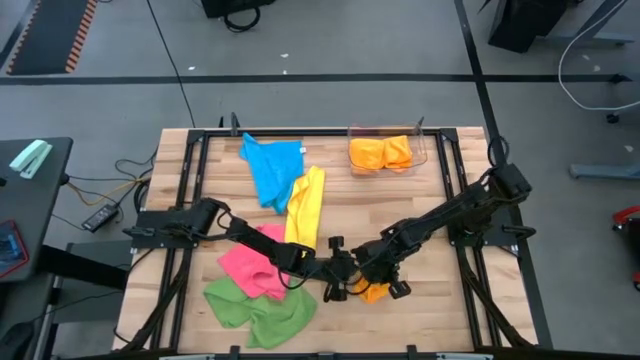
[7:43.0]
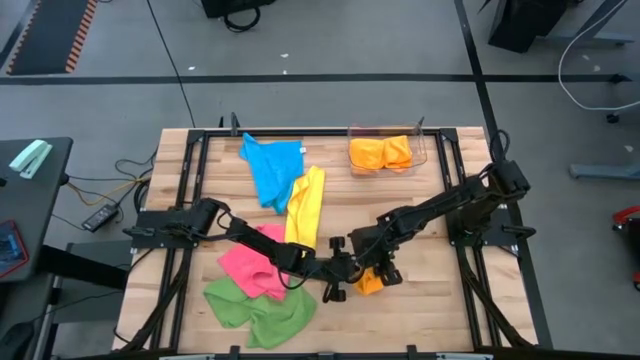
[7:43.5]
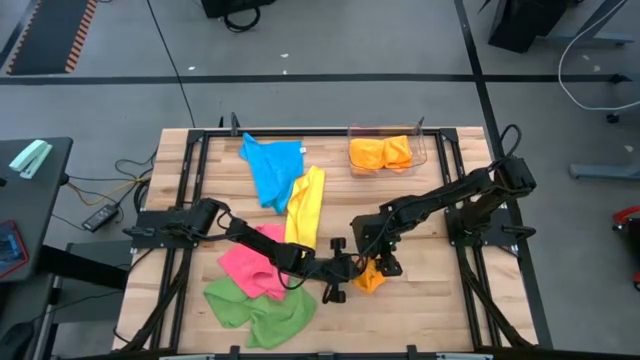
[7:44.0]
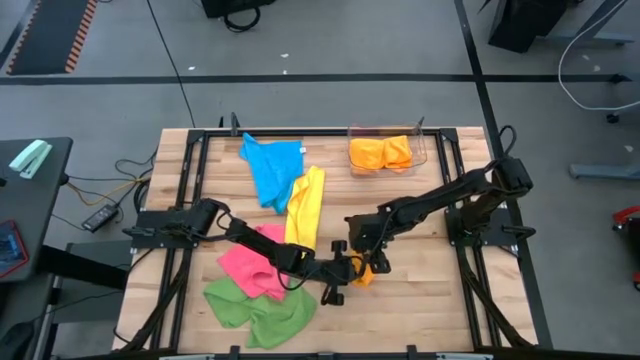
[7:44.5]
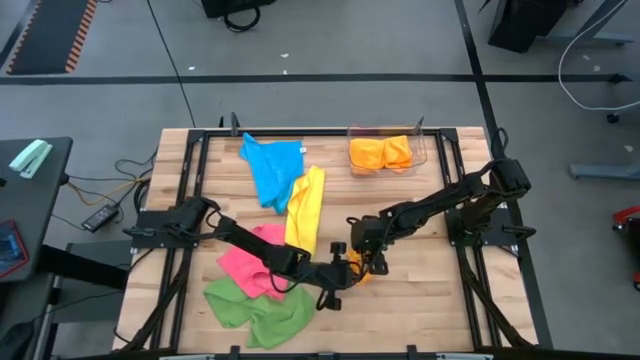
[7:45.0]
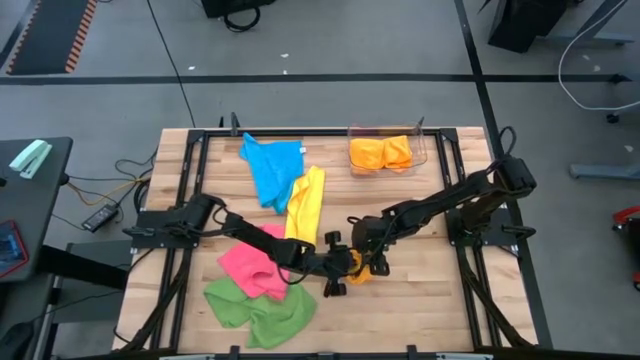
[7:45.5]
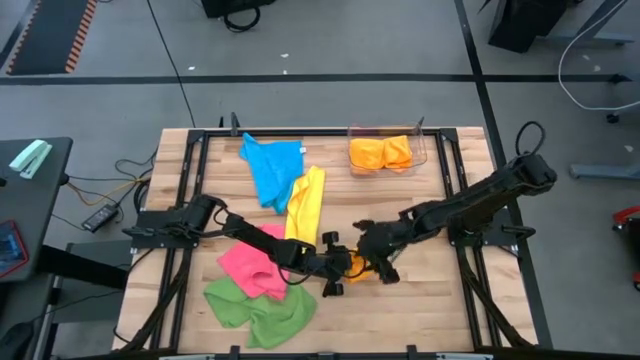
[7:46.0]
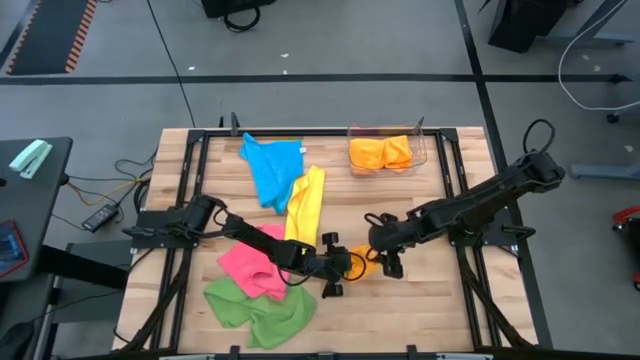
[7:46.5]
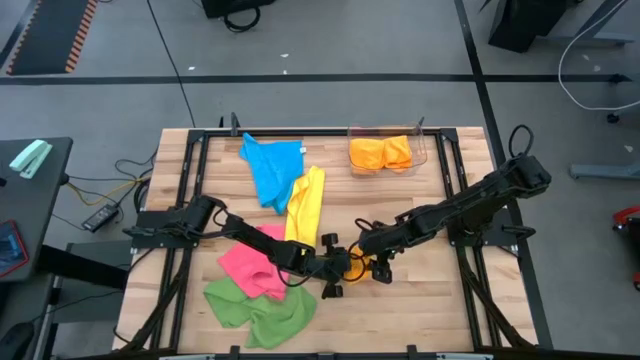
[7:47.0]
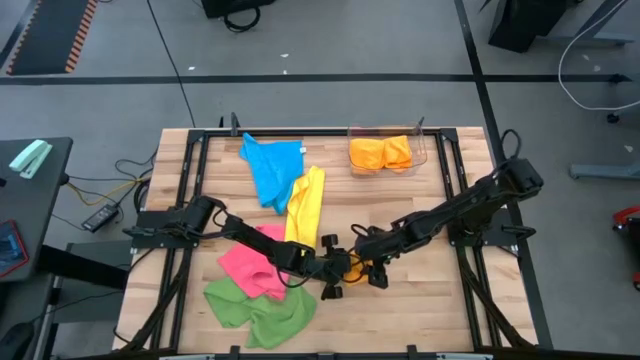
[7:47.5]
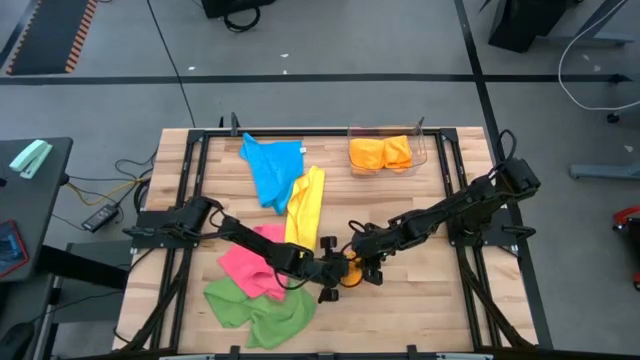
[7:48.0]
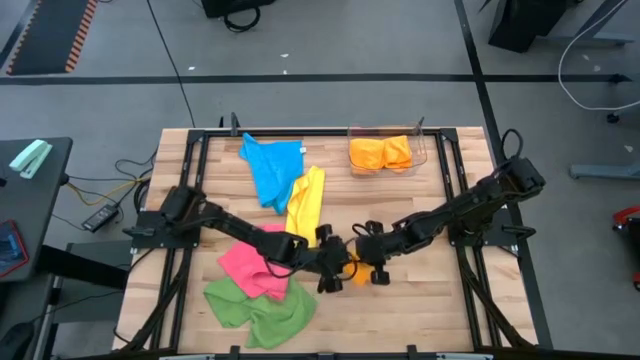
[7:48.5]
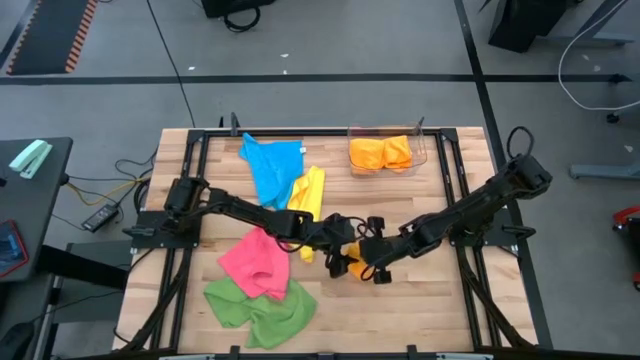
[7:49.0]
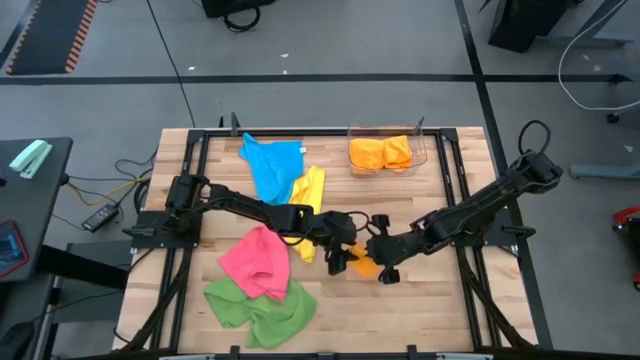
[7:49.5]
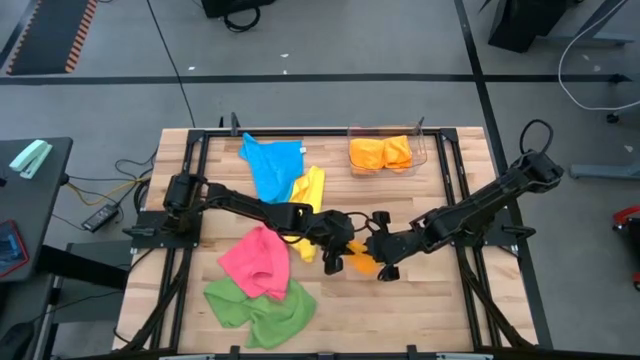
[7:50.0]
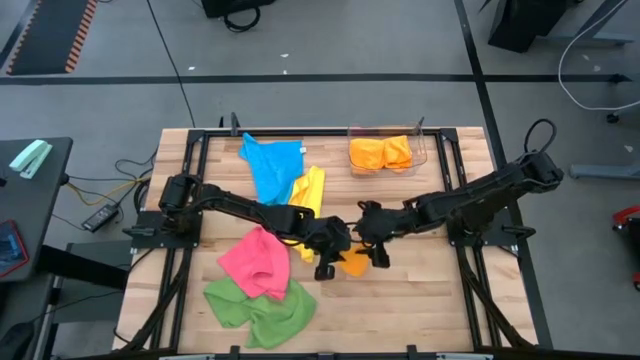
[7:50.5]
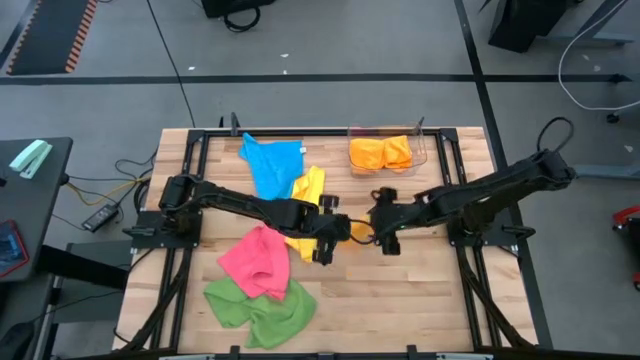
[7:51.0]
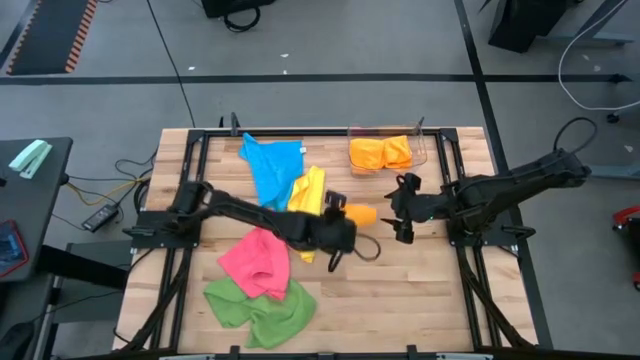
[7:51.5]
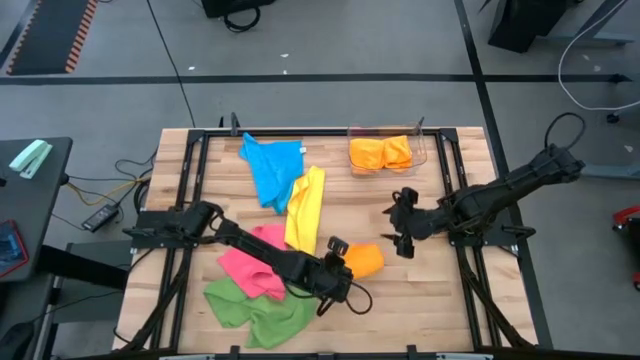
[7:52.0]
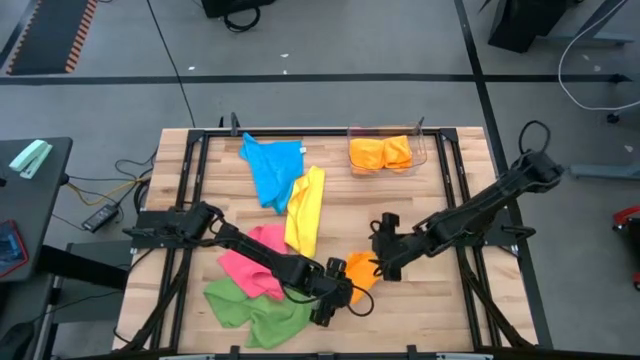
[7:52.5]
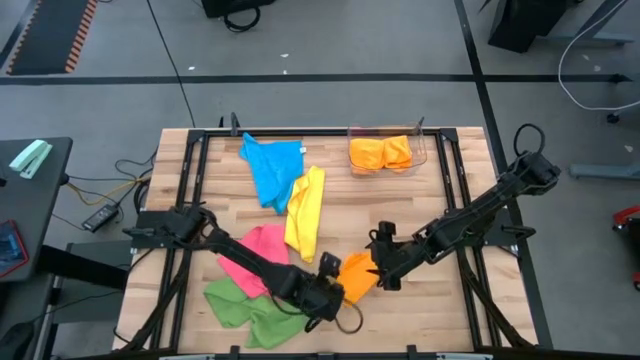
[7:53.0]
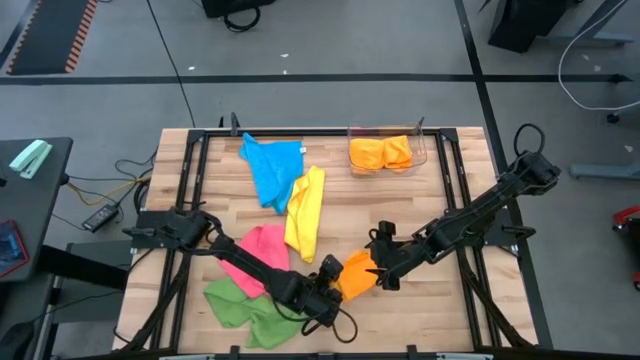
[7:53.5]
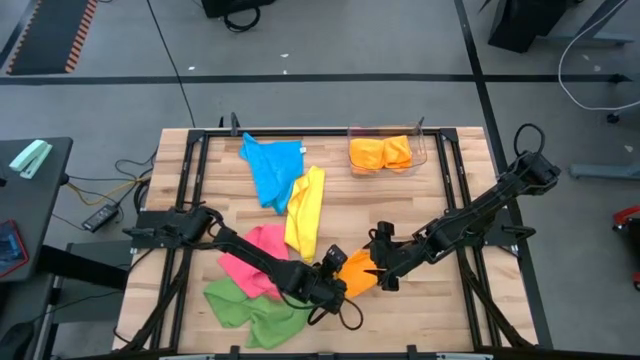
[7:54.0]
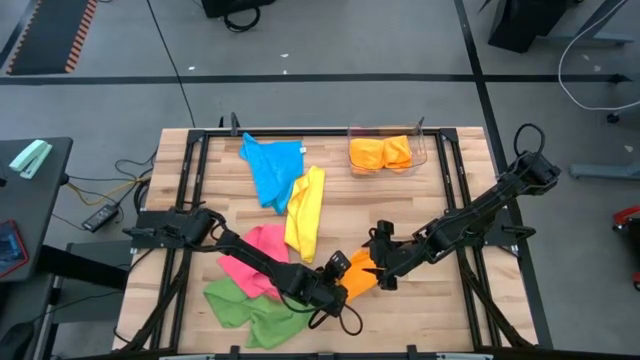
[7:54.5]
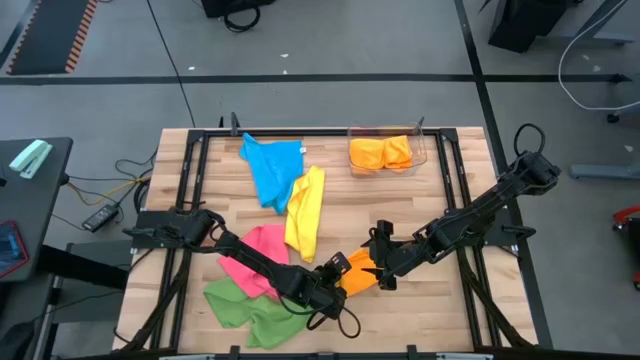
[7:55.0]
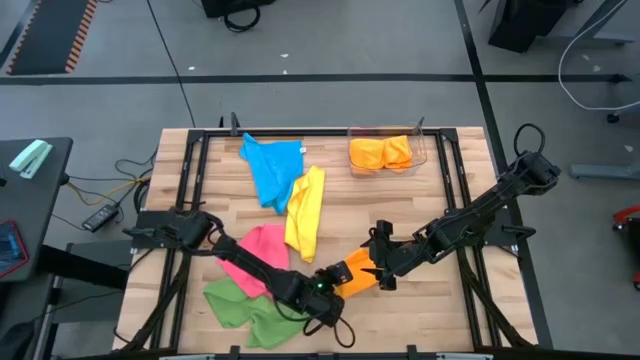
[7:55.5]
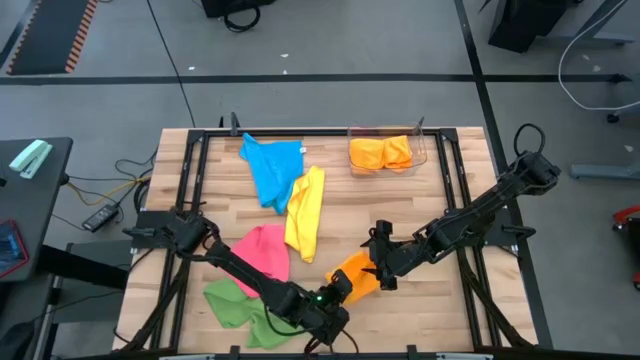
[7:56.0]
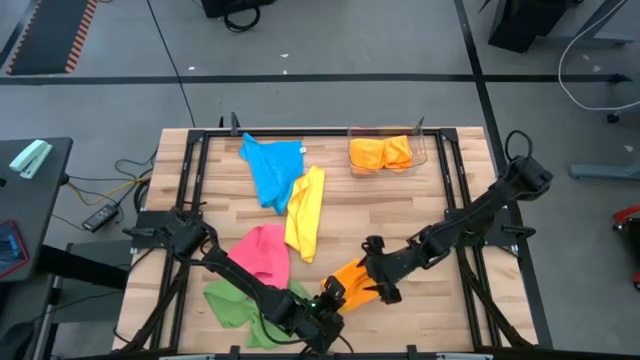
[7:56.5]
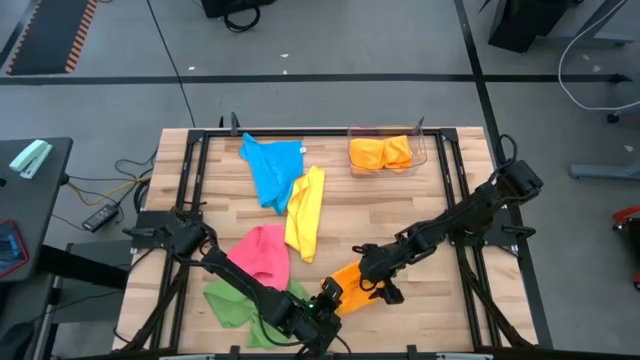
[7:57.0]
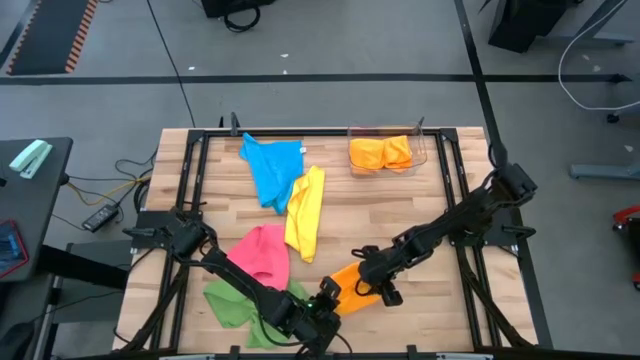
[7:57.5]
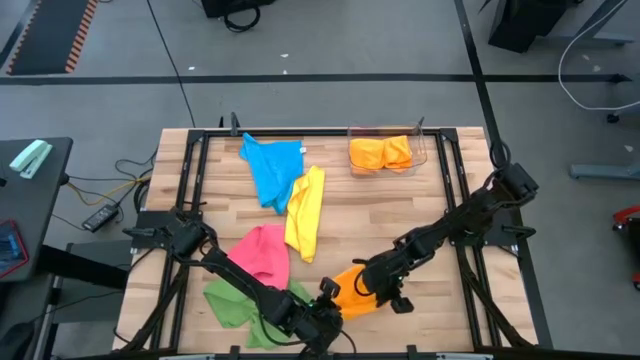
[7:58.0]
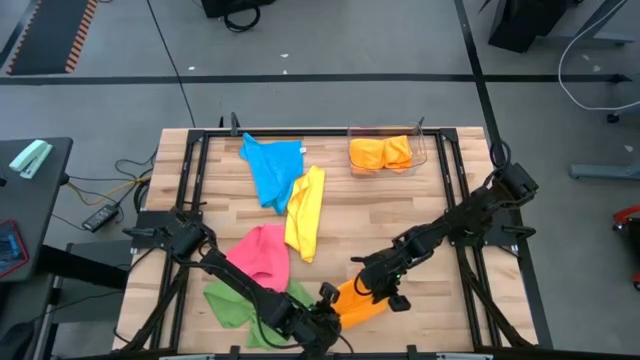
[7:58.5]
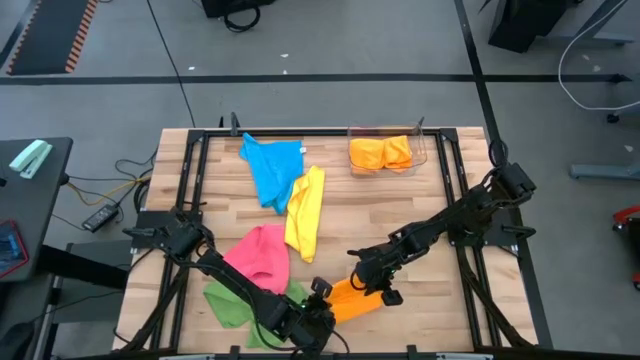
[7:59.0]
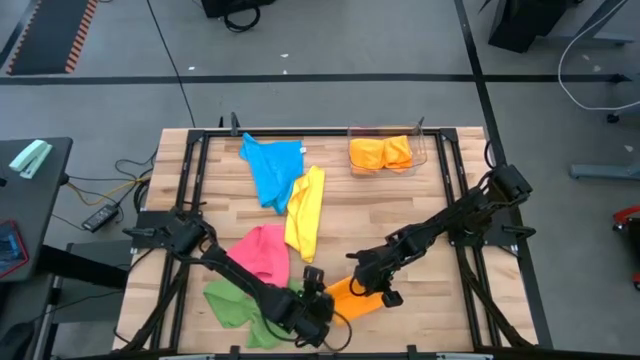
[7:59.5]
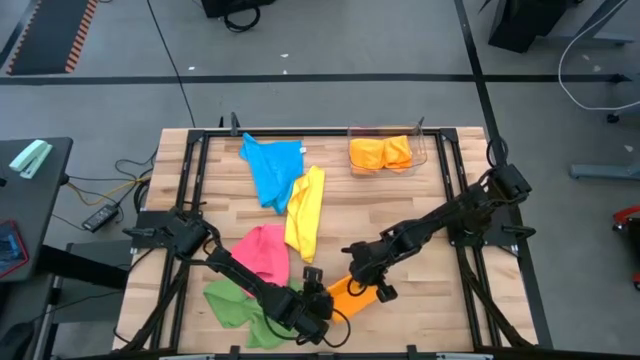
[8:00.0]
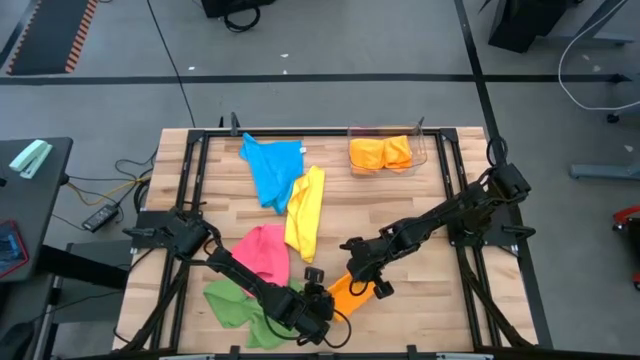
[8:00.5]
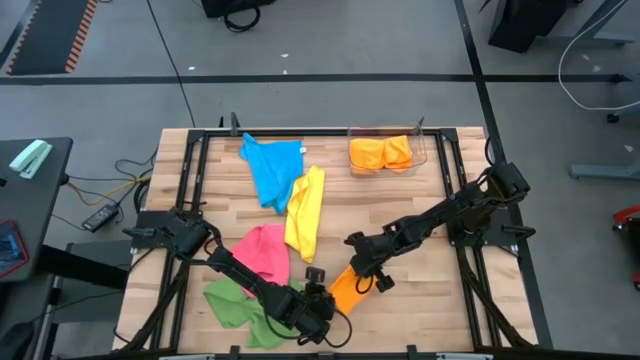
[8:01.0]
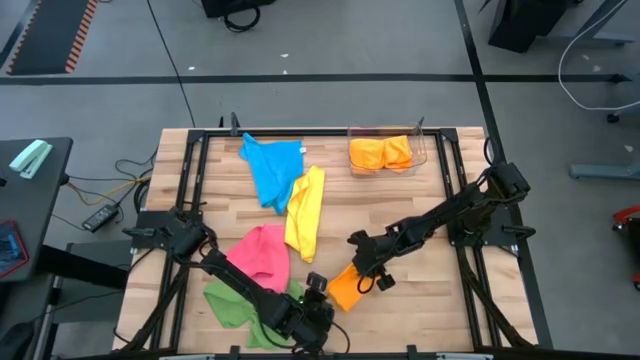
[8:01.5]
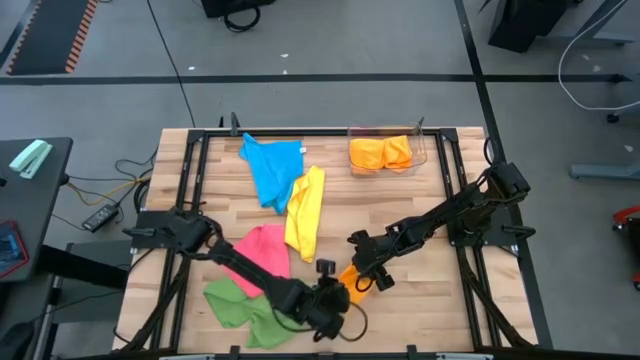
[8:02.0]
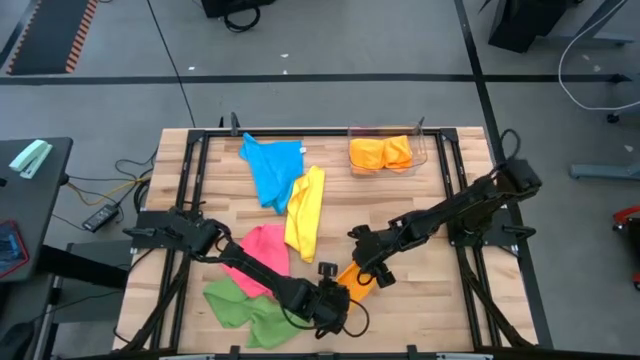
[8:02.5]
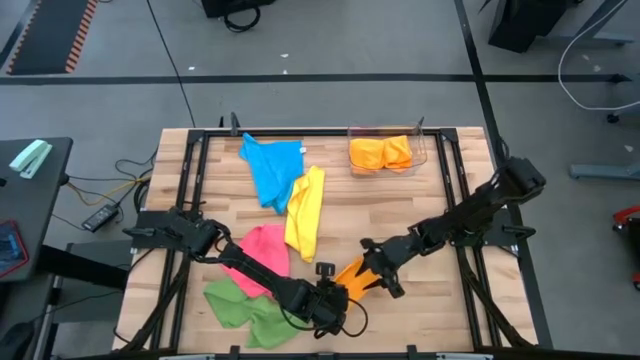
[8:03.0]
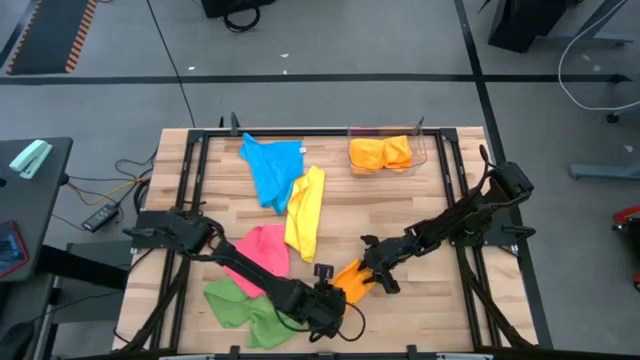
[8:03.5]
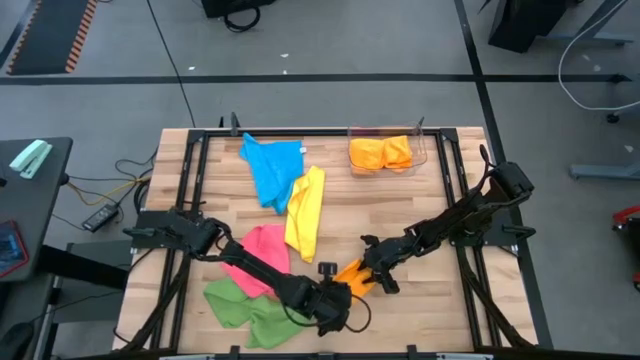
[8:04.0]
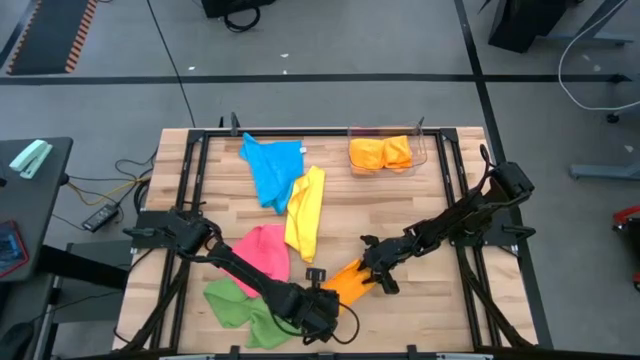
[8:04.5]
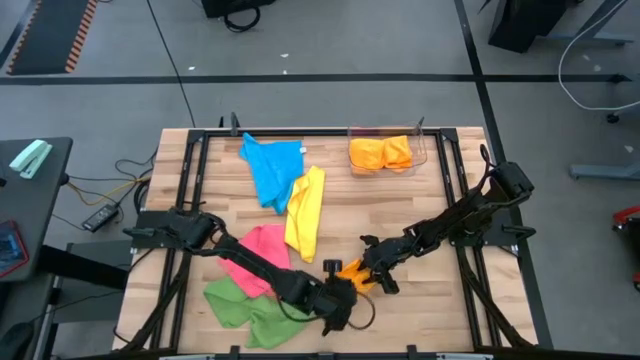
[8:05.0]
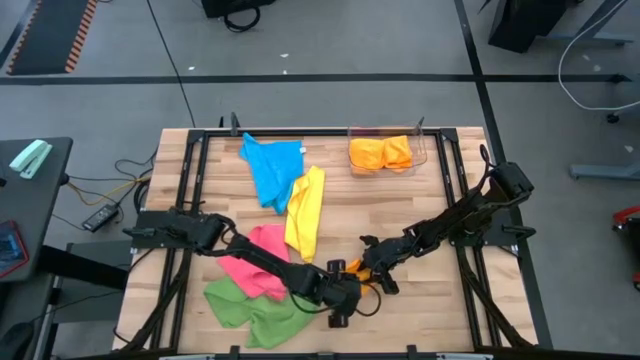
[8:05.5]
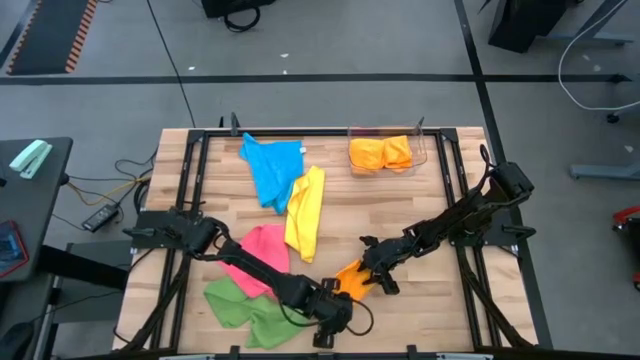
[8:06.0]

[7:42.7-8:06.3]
Task: Fold microfiber towels
Fold the orange microfiber cloth
